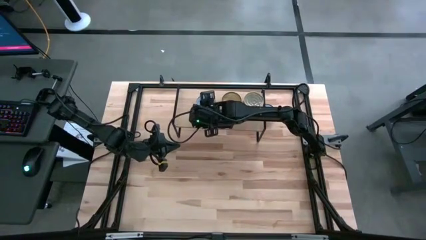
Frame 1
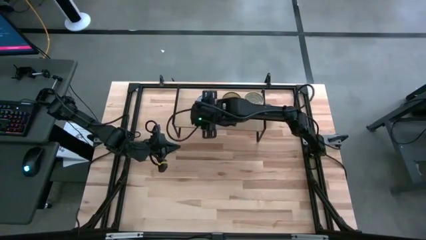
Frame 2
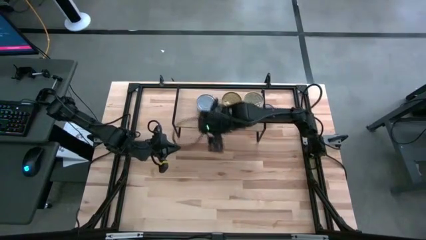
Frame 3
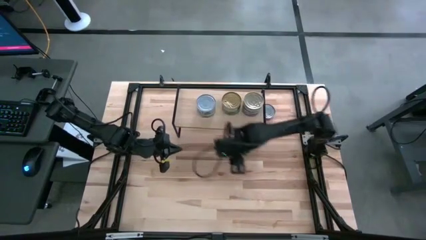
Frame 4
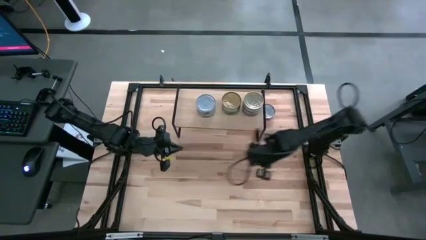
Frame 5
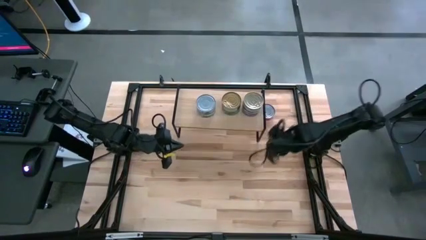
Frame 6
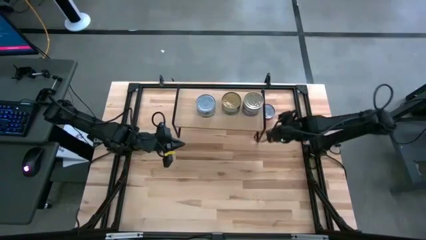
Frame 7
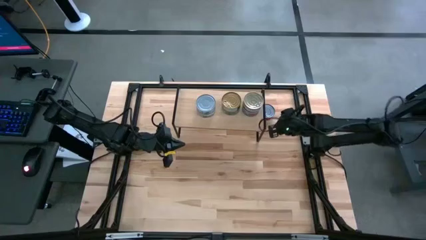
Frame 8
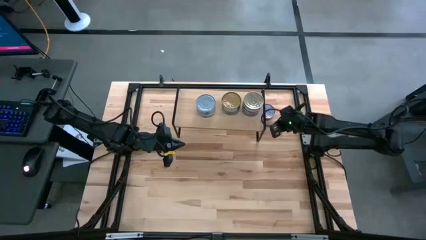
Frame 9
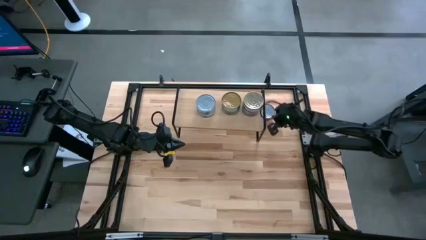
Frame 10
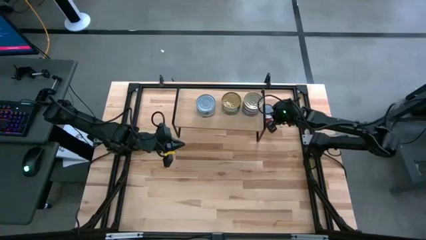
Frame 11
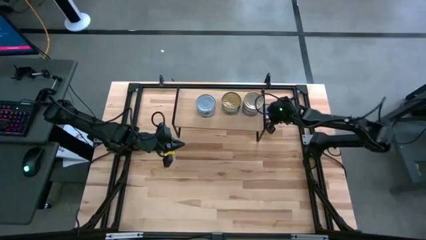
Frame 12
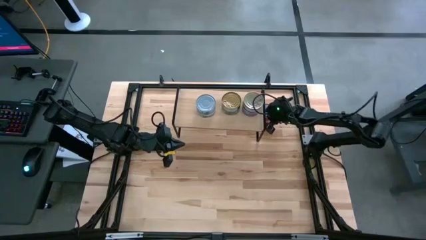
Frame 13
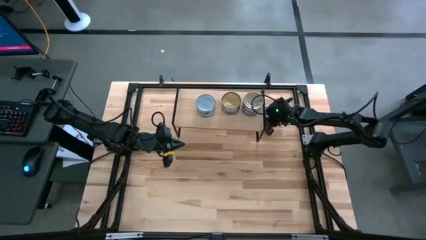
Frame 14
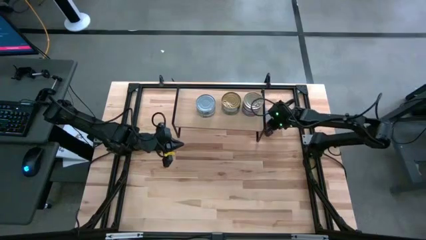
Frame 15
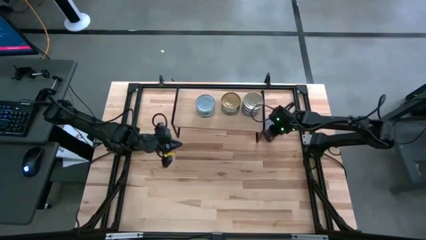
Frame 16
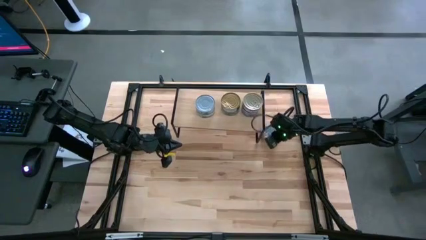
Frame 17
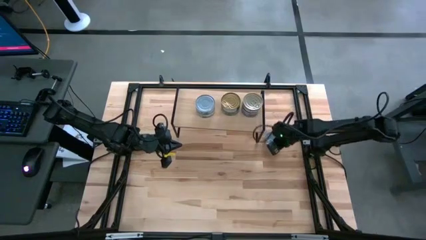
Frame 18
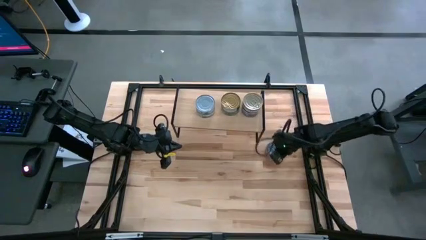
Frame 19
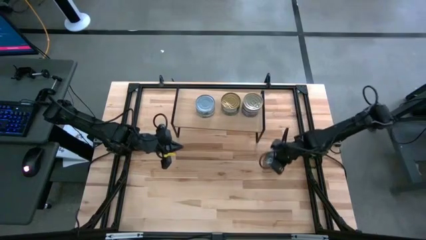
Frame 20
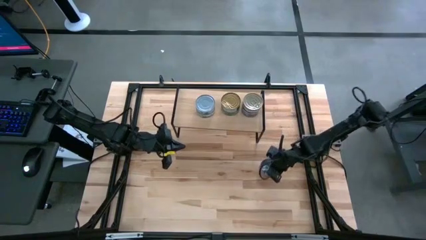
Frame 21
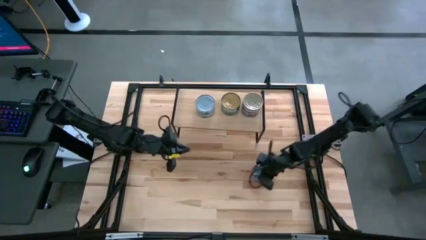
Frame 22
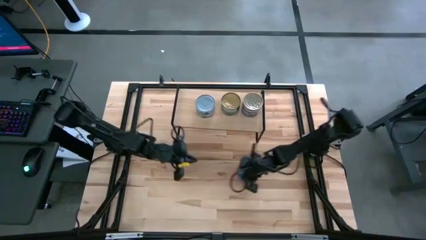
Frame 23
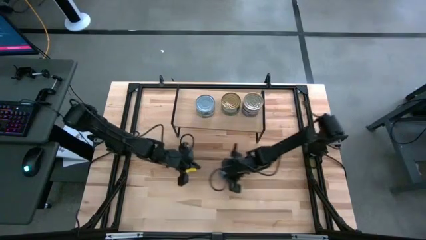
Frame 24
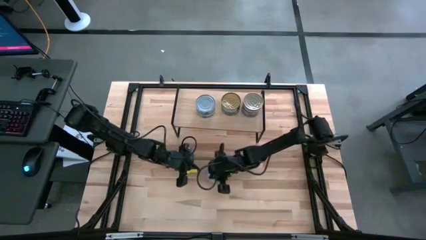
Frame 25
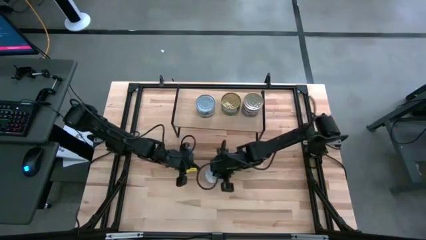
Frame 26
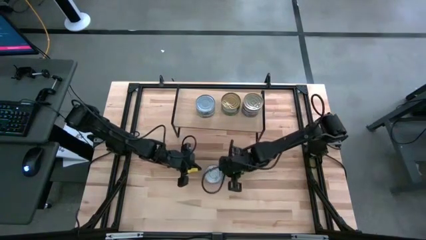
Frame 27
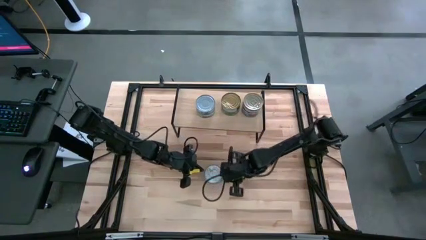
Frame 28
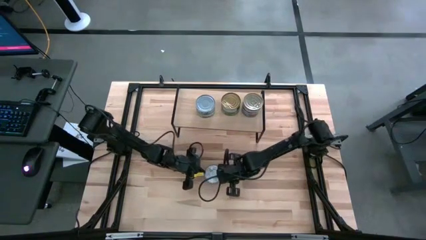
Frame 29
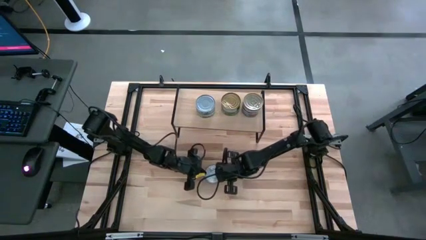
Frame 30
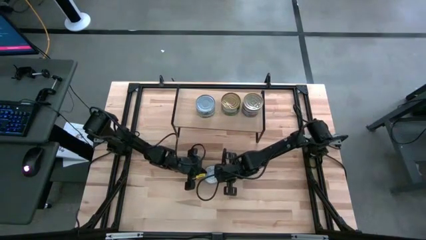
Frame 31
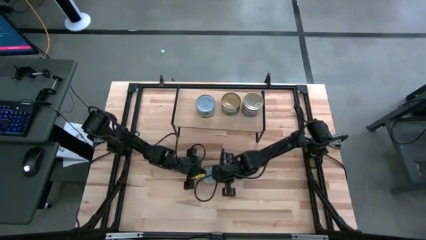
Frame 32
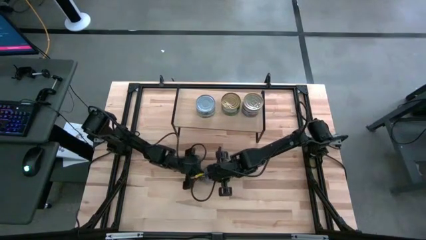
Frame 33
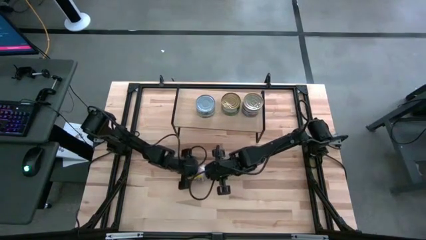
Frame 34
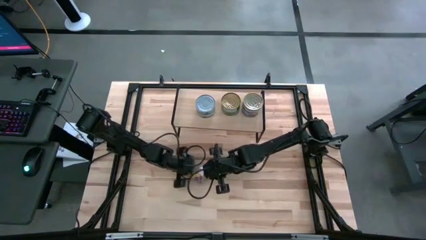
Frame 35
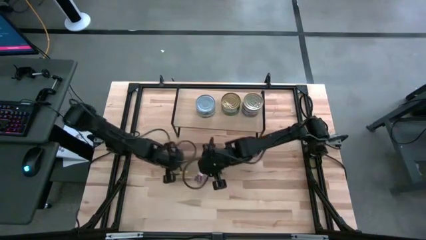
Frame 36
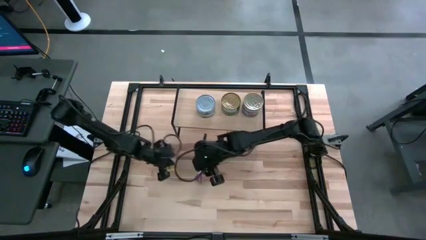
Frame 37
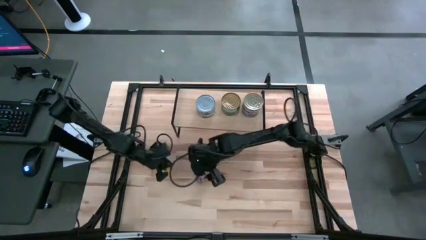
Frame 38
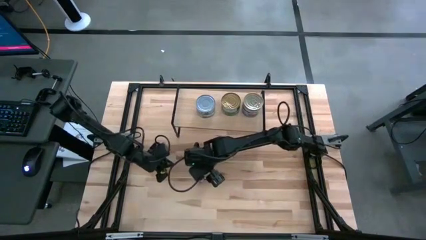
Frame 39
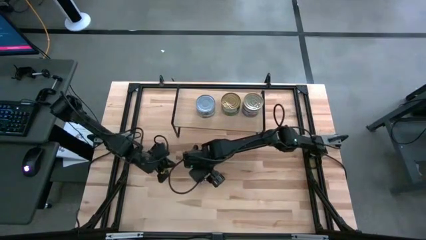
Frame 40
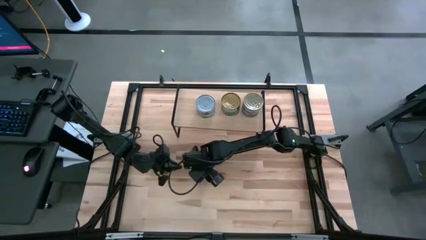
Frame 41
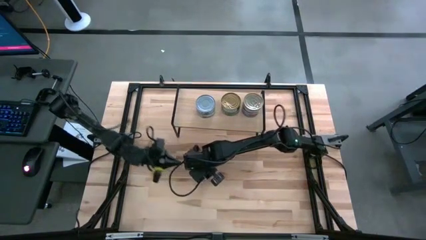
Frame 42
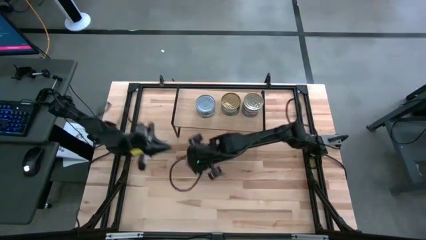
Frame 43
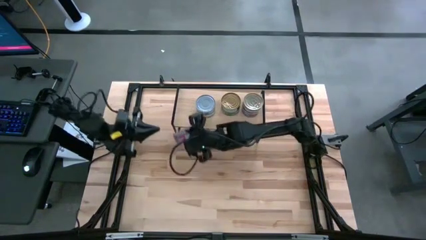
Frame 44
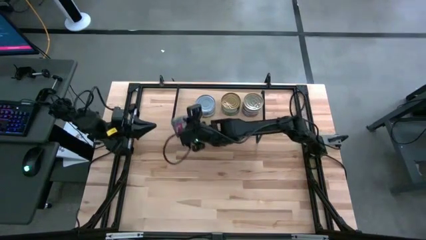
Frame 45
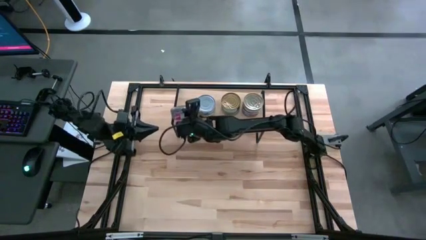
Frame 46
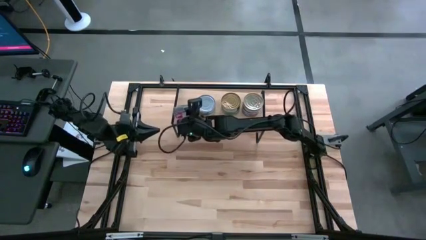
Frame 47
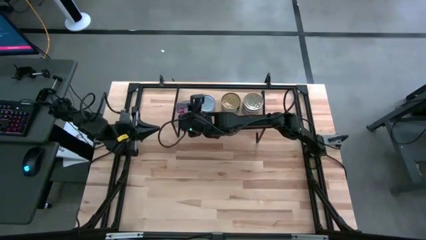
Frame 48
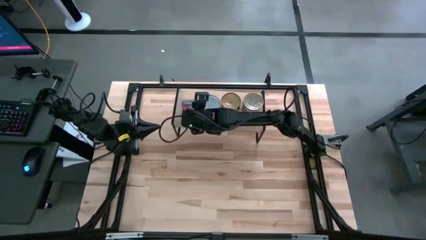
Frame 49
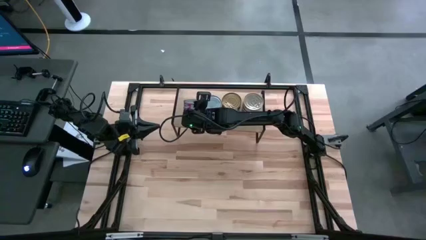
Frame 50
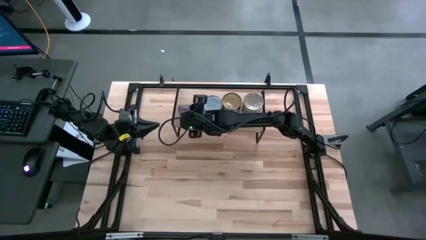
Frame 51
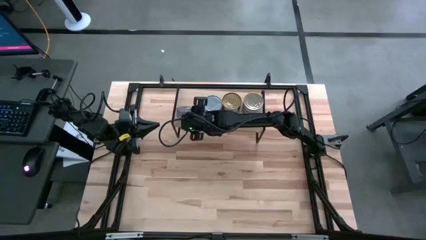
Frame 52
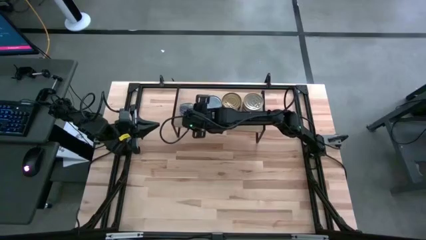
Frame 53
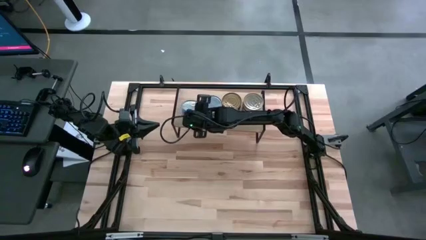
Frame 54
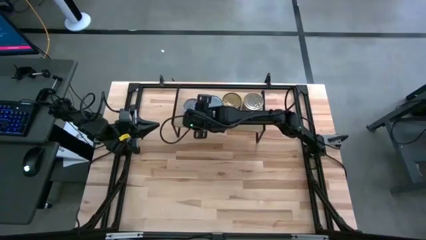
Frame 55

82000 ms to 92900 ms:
Task: Stack canned seafood by type on shelf
Put the red tuna can on the shelf

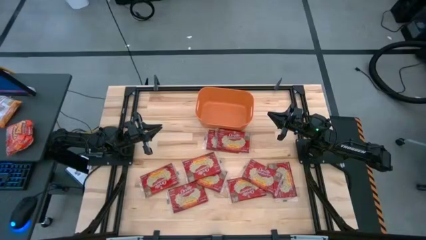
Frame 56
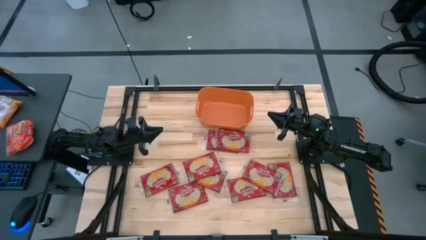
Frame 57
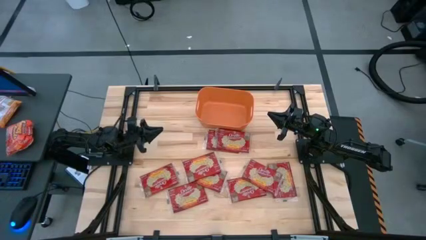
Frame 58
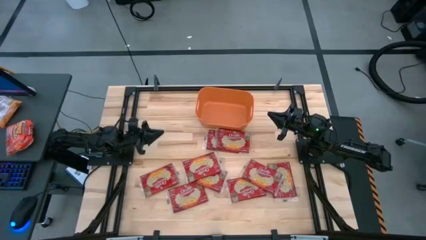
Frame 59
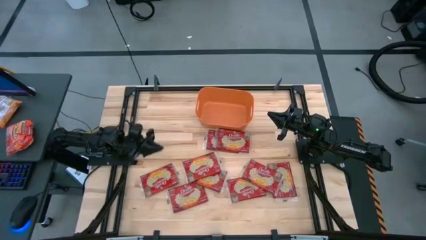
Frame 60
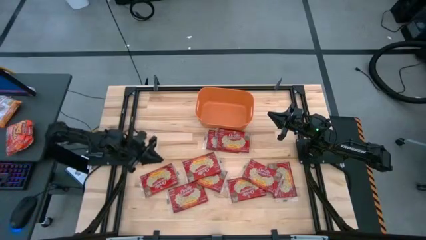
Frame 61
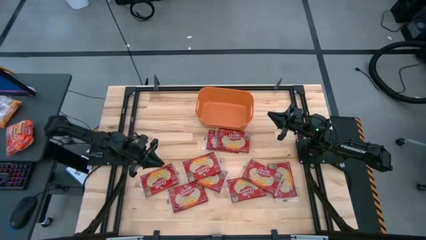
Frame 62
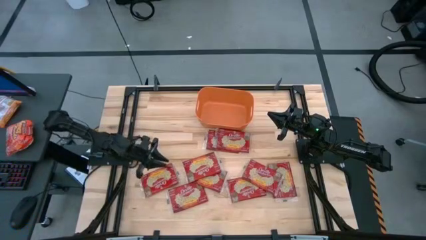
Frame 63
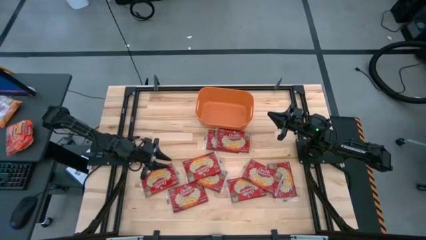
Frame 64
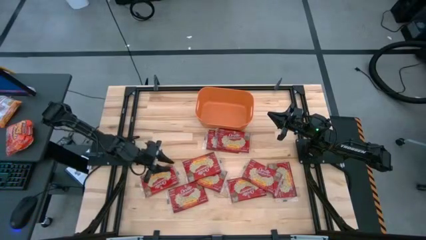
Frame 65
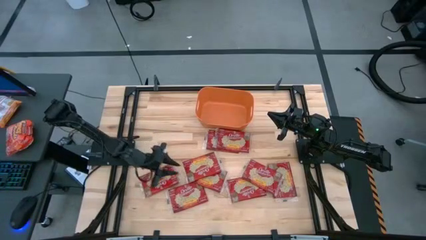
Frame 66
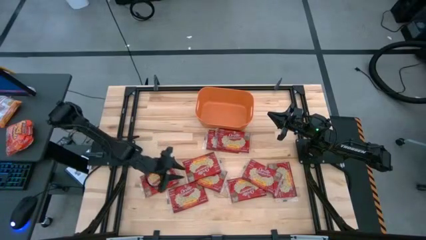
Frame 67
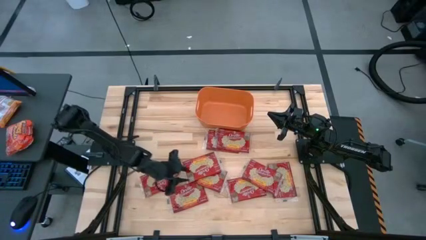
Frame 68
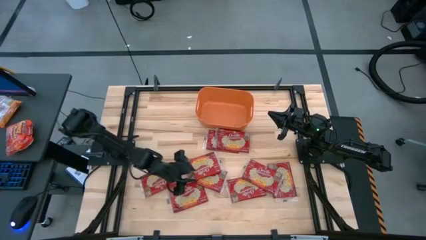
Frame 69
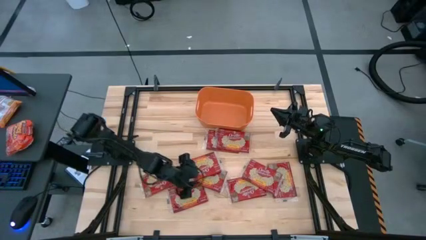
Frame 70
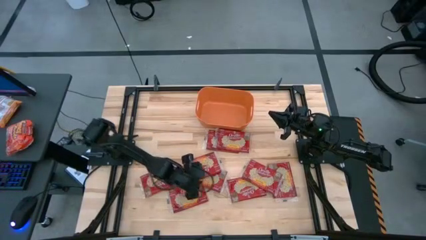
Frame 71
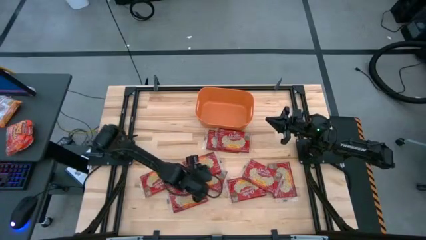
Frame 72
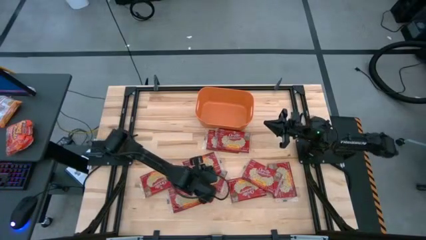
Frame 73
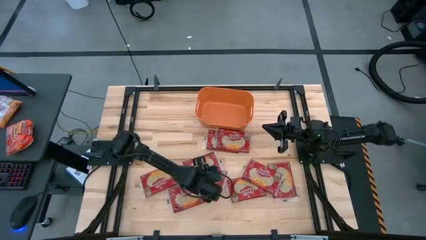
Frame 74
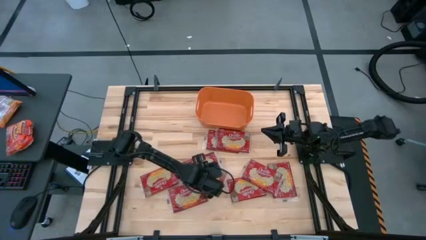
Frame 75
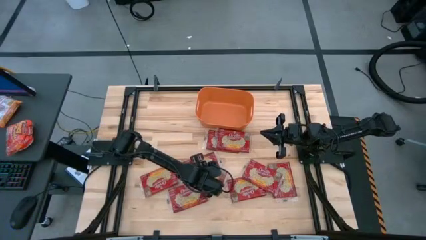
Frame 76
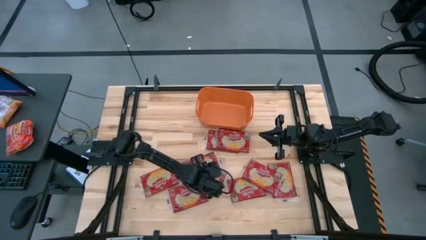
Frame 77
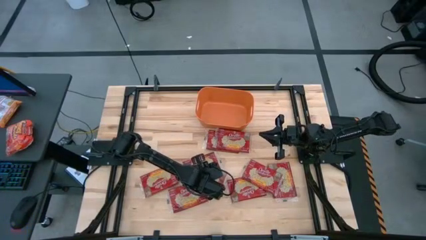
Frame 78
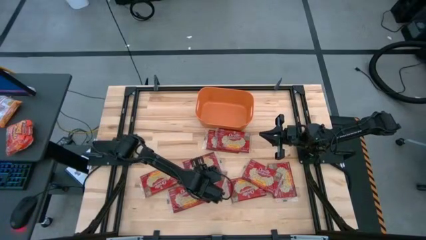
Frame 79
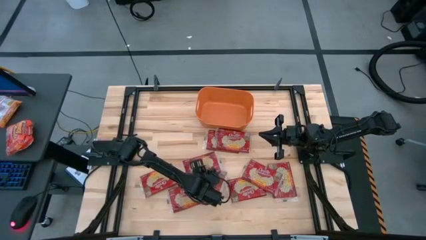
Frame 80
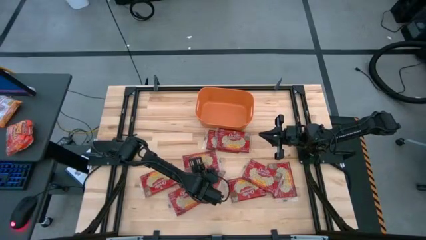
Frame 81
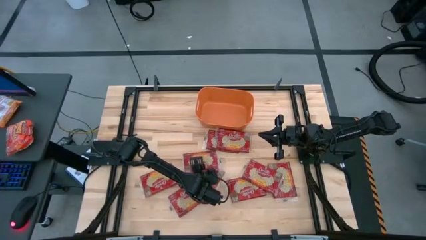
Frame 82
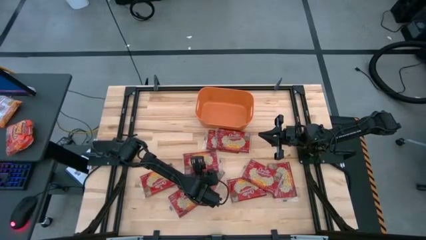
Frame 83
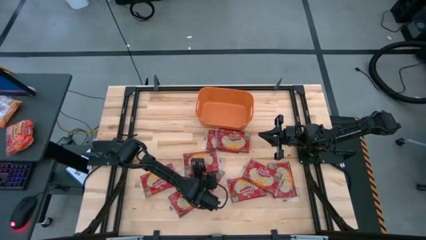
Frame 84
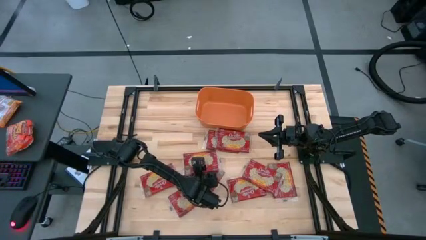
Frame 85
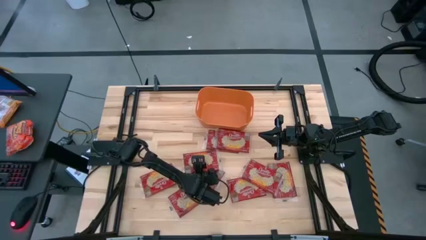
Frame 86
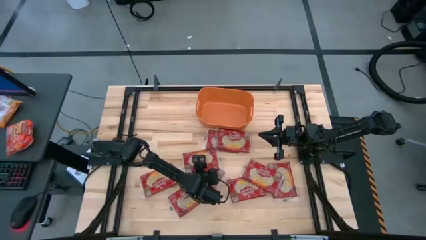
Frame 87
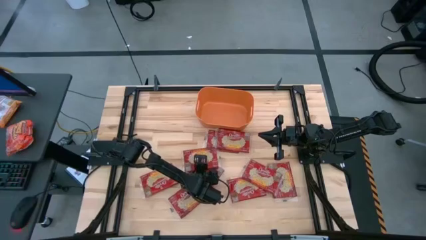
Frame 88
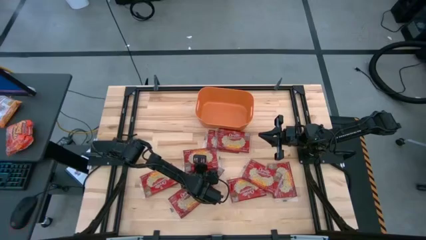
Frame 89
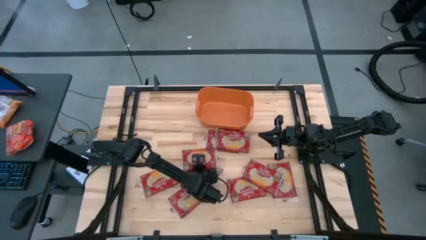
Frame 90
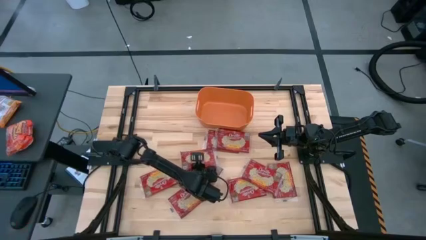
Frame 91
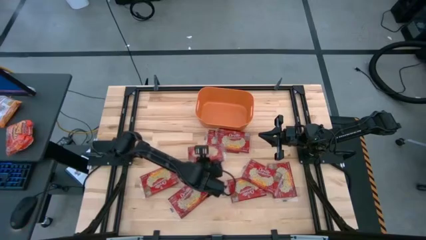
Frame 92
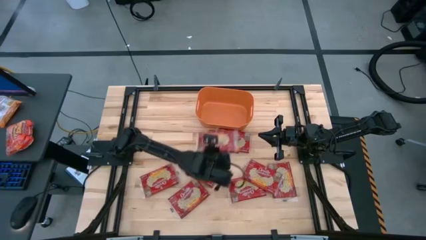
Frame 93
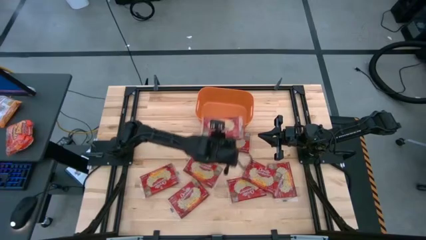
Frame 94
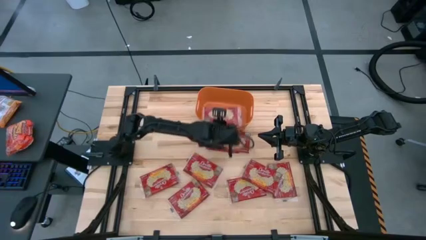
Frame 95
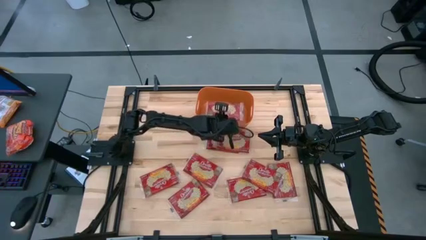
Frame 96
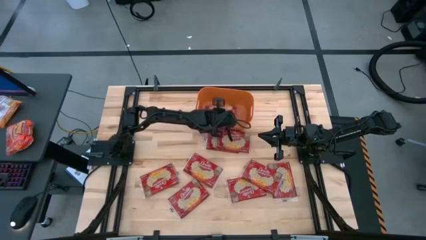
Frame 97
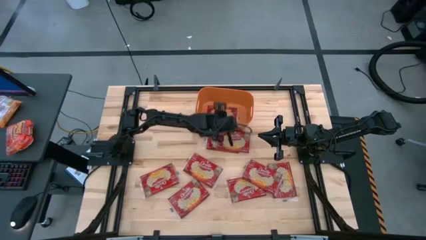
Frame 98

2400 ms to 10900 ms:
Task: Sort popcorn bags into baskets
Put the red popcorn bag into the orange bin
